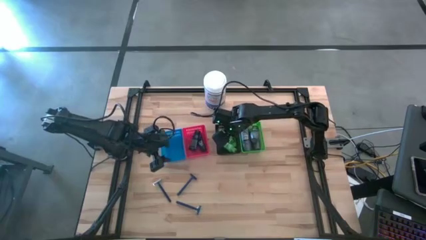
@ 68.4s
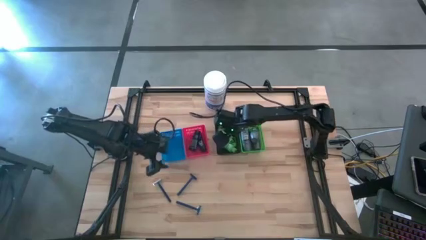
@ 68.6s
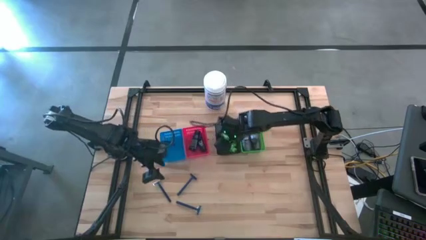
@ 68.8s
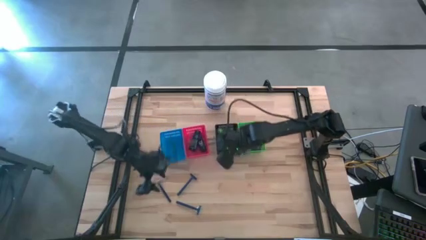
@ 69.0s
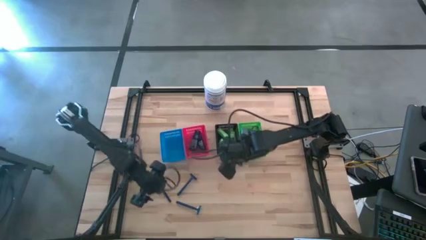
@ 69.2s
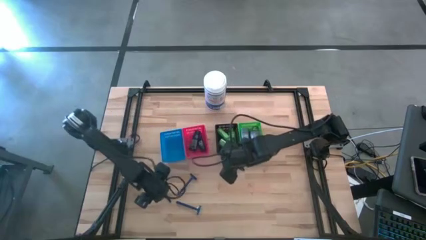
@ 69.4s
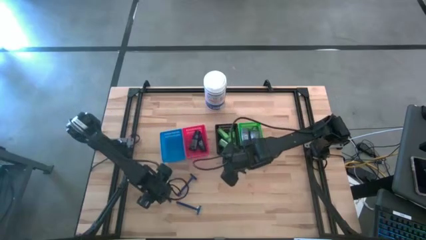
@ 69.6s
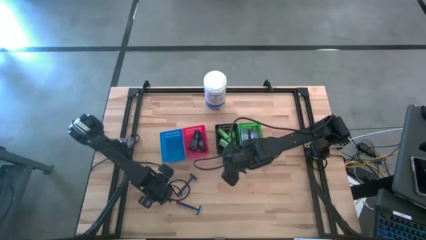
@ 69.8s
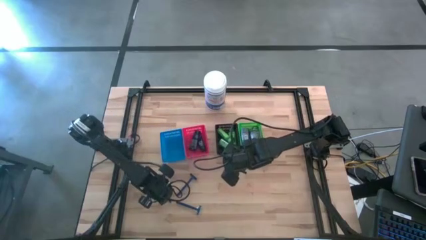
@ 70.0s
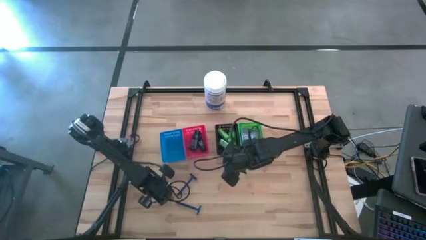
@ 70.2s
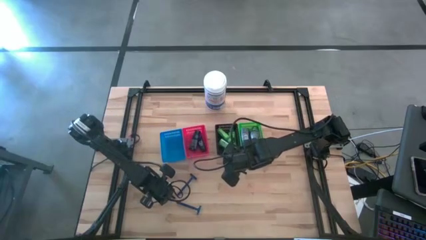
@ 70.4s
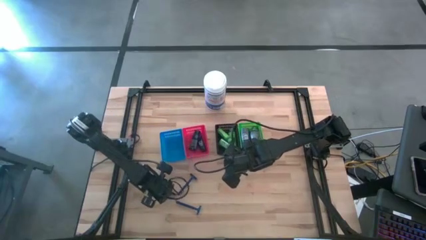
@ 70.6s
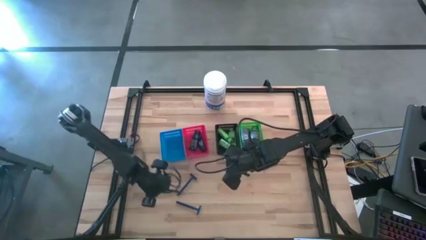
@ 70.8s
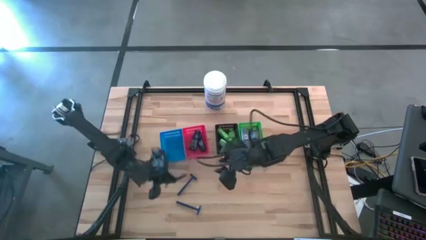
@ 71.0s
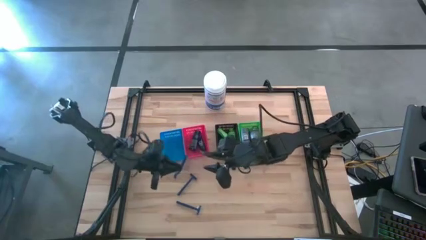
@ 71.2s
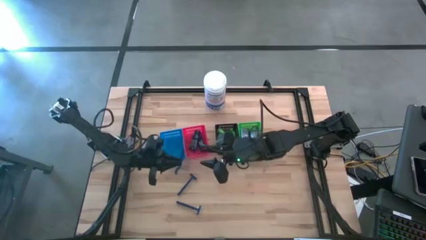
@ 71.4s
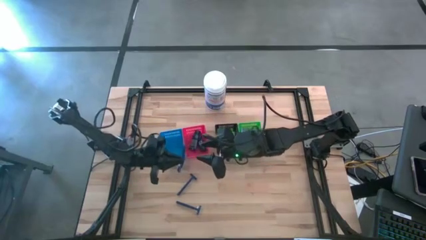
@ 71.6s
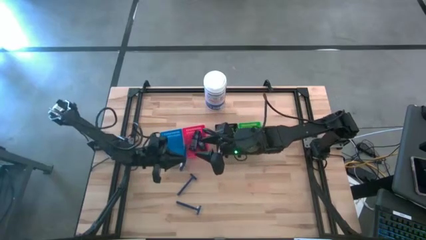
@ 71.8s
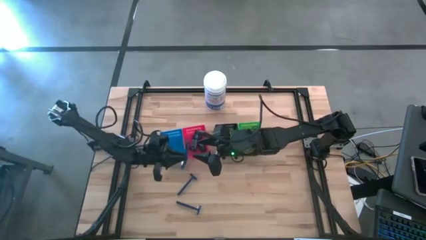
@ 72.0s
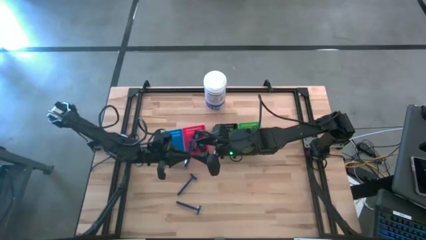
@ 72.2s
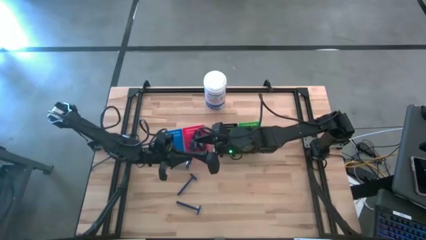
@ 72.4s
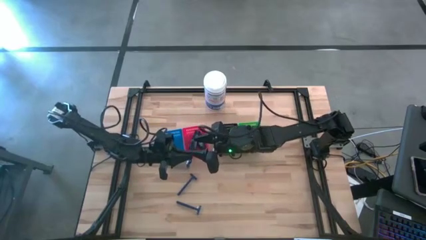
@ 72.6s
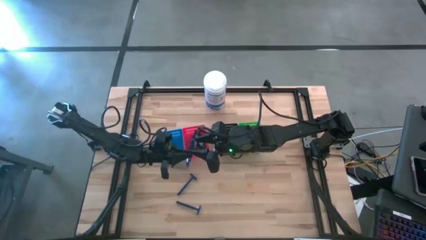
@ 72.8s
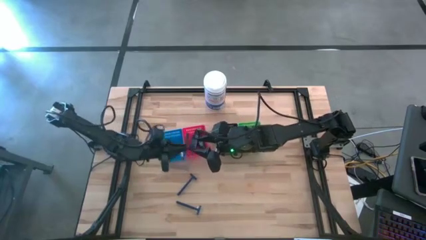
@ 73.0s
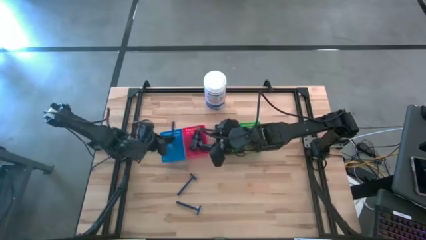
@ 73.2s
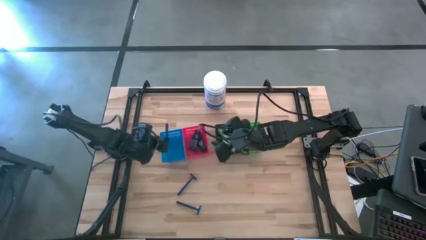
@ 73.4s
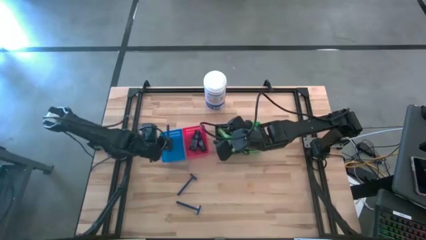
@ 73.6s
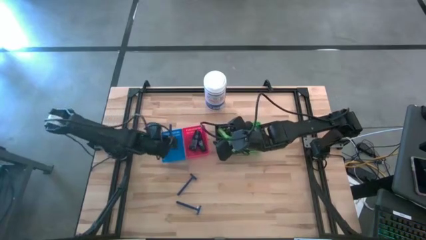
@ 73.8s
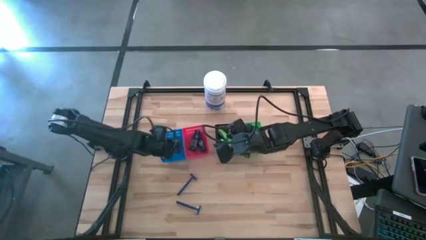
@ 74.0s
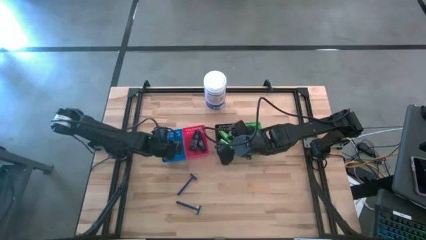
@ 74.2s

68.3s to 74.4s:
Task: Pick & Place Travel size toiletries
Put the blue razor into the blue basket

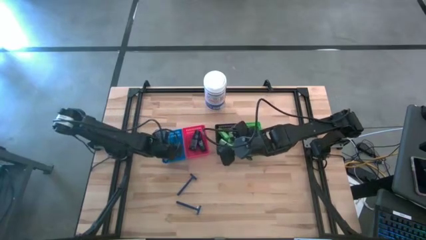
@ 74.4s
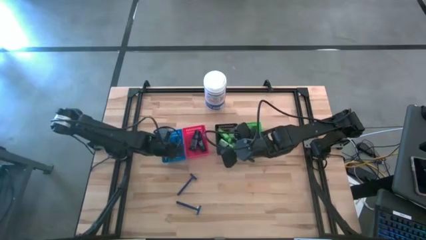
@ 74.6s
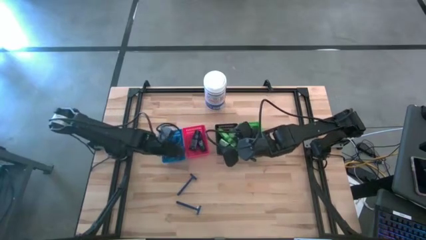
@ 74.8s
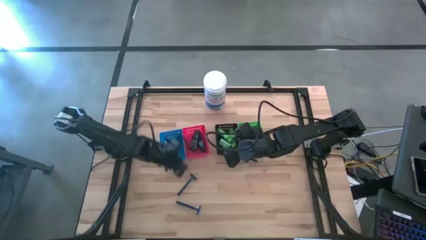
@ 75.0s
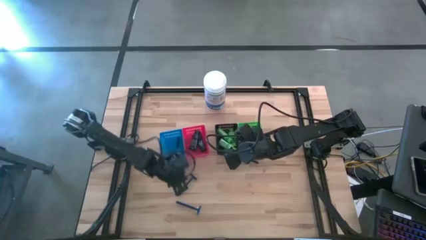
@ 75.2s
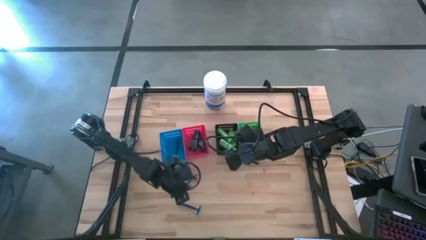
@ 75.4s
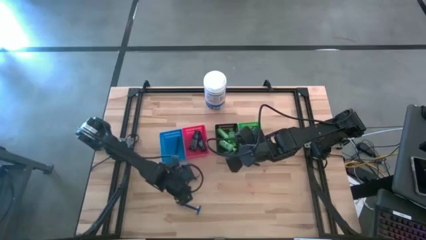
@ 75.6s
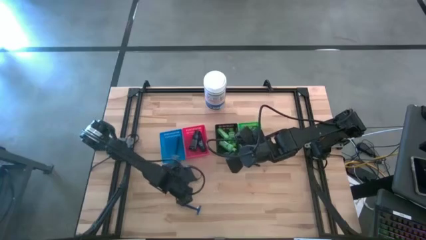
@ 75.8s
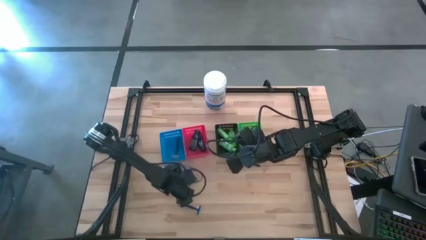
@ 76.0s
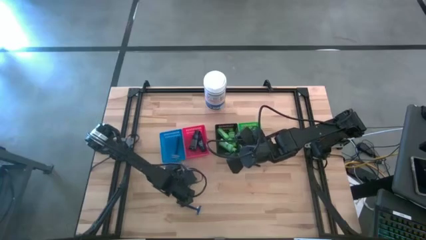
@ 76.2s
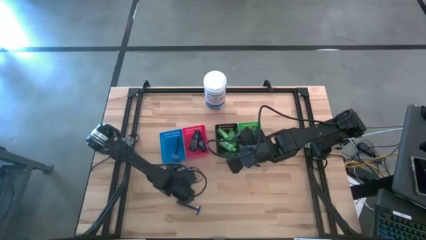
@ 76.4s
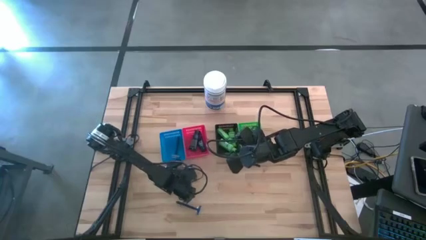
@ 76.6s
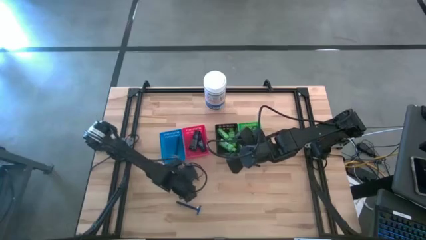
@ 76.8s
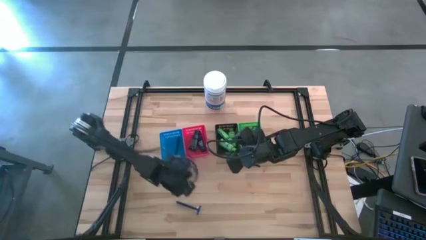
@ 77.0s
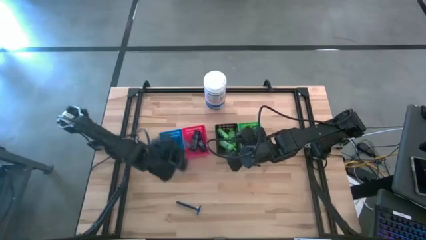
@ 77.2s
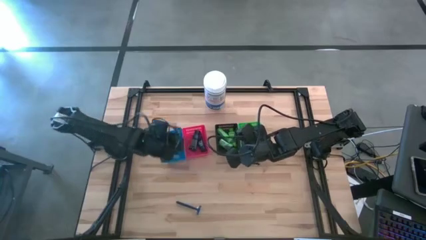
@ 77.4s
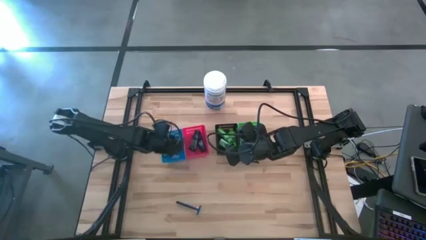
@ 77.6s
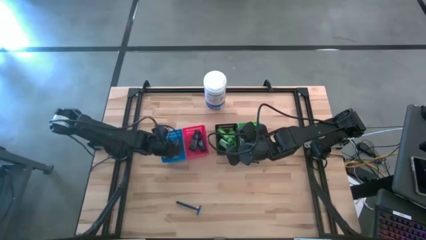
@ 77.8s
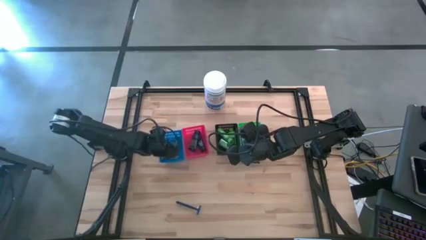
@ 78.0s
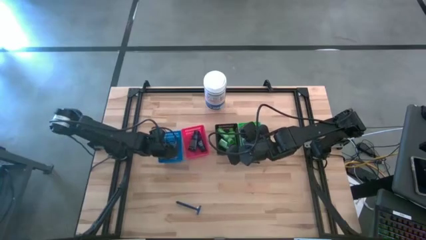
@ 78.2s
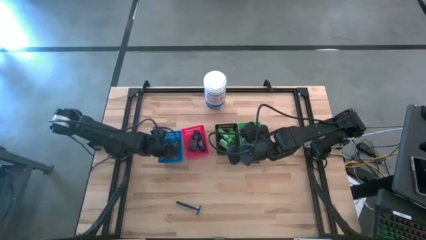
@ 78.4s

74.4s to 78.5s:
Put the blue razor into the blue basket

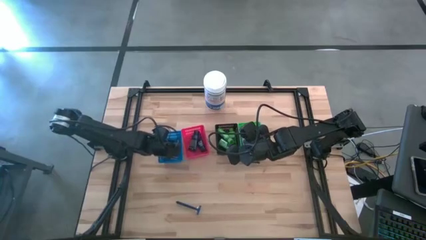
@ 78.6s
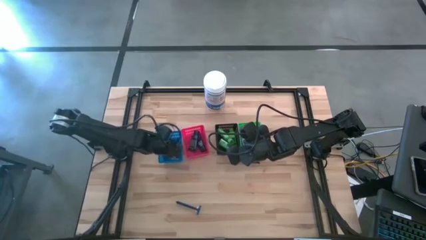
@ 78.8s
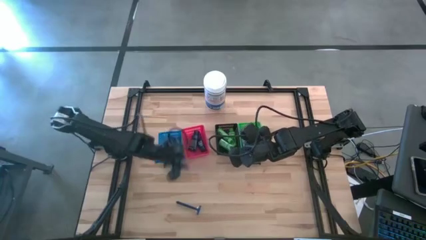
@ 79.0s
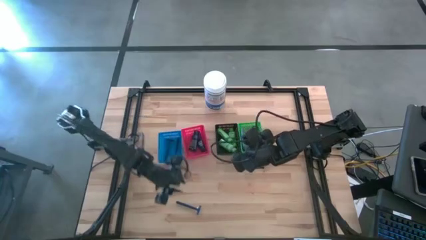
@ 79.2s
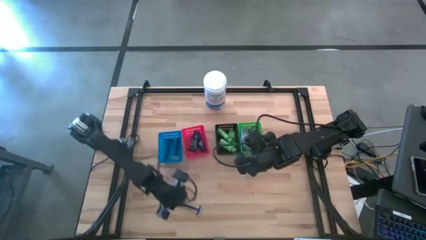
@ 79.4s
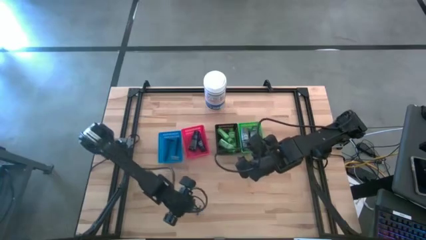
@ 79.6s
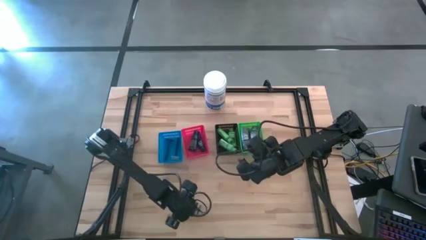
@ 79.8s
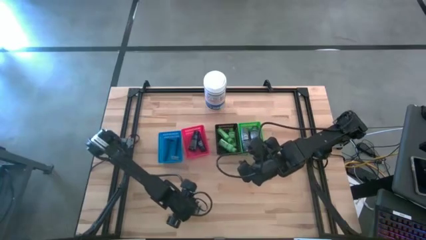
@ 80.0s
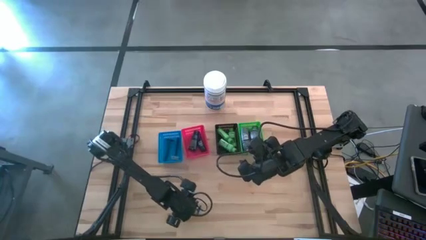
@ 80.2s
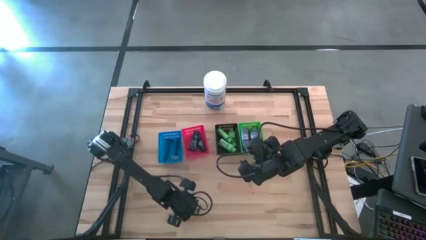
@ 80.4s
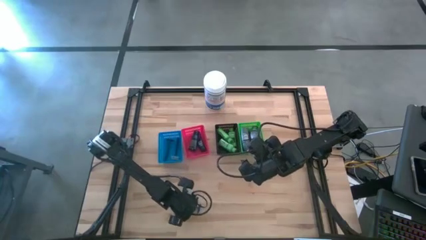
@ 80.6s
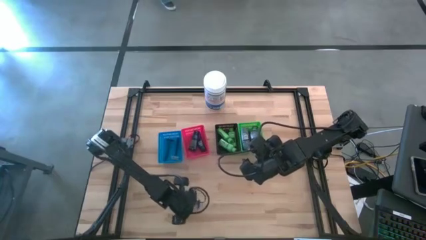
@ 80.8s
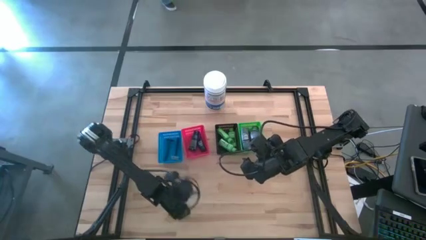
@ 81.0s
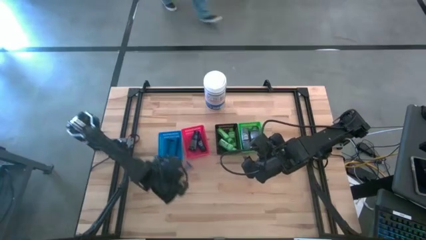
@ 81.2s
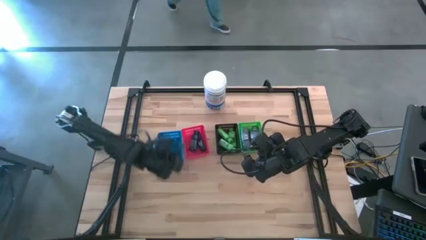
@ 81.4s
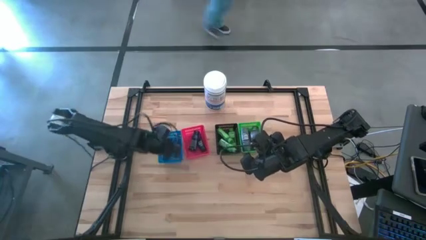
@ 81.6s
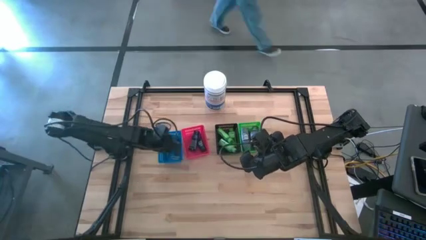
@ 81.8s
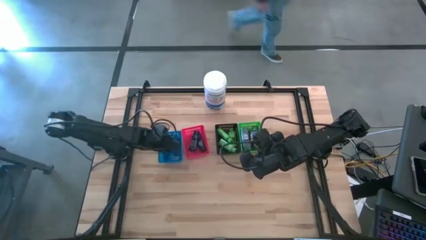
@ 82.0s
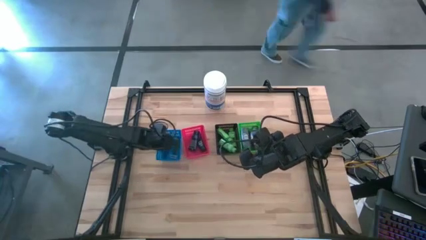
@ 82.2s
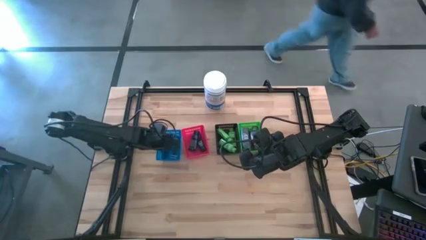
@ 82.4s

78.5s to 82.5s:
Put the blue razor into the blue basket

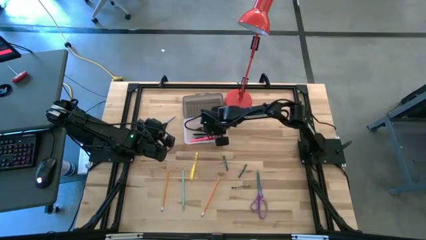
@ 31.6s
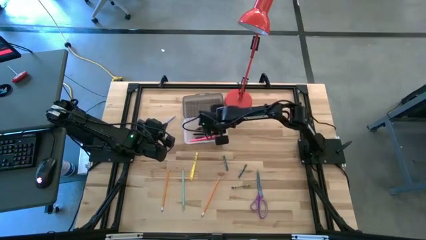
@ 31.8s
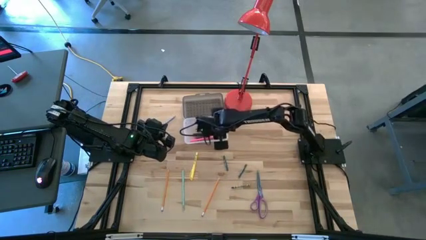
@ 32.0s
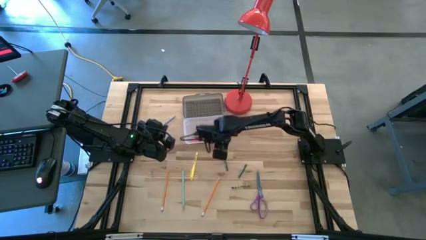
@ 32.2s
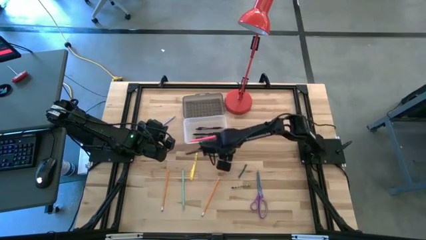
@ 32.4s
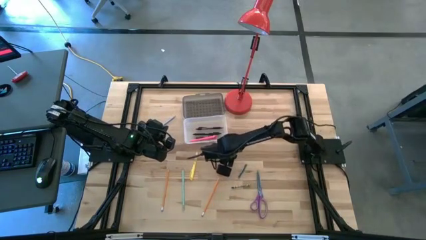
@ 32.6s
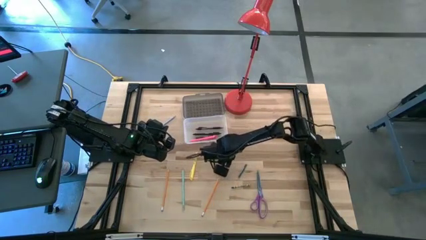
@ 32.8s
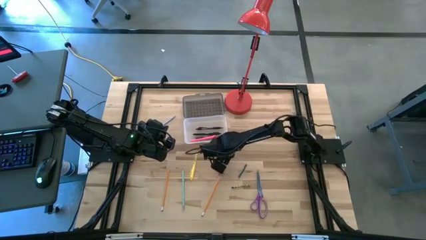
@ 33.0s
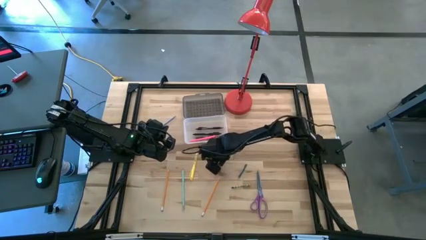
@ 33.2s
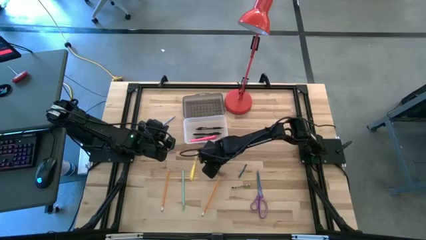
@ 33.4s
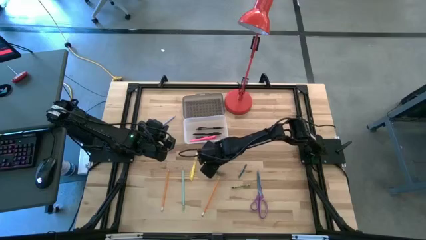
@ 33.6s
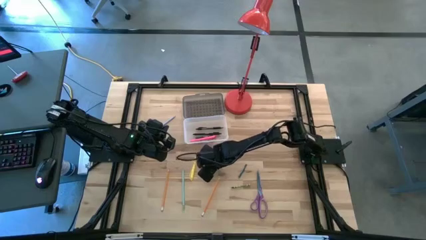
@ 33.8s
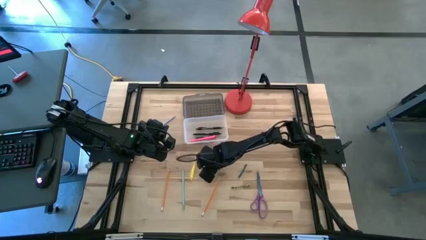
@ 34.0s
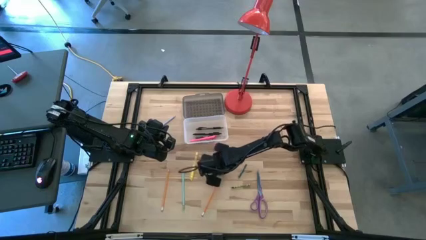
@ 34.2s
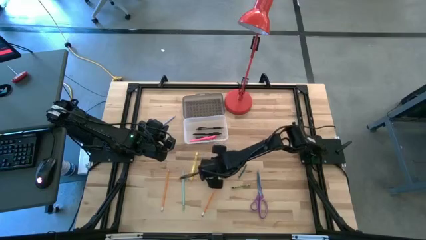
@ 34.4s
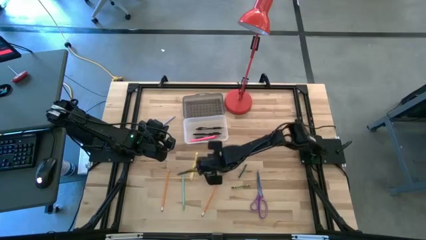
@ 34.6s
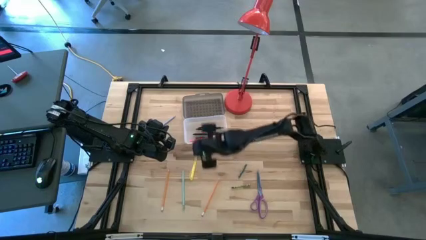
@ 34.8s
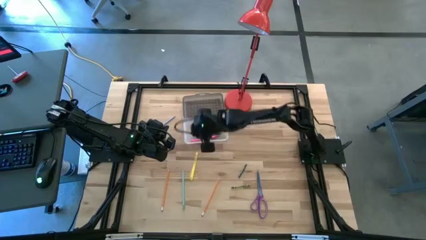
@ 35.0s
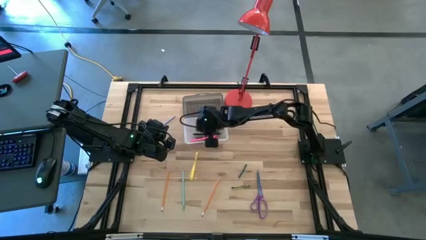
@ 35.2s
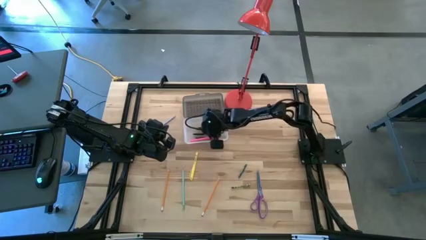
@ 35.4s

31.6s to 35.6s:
Task: Pick & place school supplies into a supply box
Put the left dark green crayon into the black supply box
